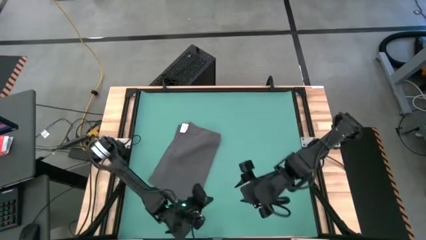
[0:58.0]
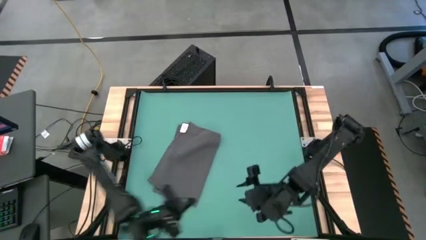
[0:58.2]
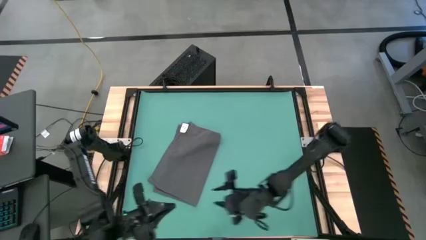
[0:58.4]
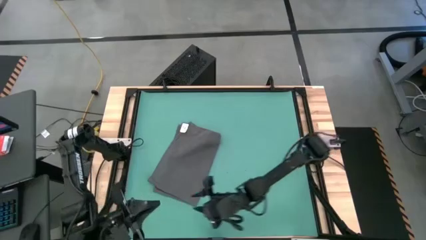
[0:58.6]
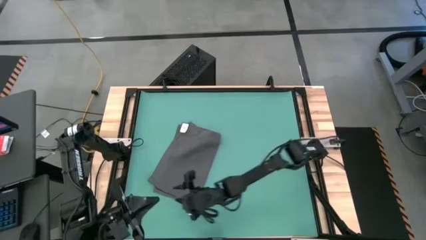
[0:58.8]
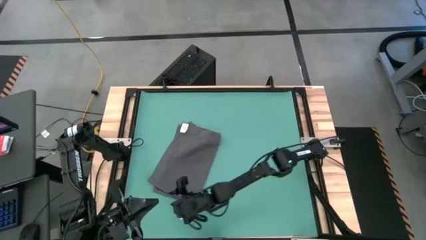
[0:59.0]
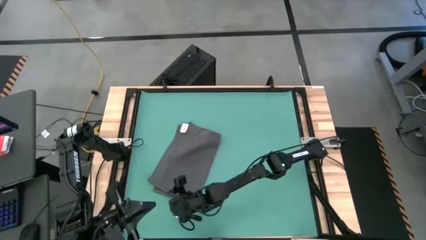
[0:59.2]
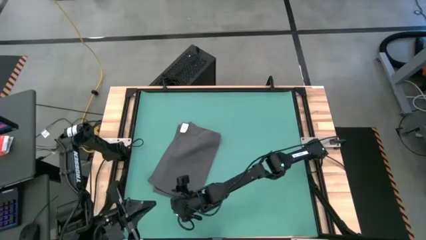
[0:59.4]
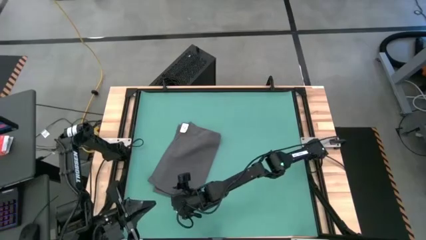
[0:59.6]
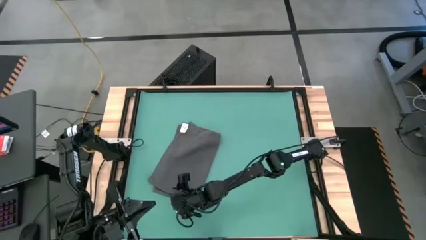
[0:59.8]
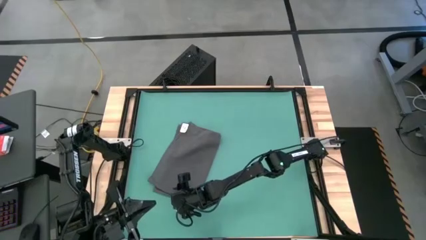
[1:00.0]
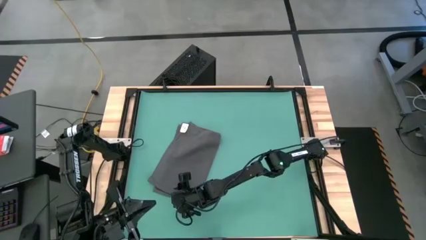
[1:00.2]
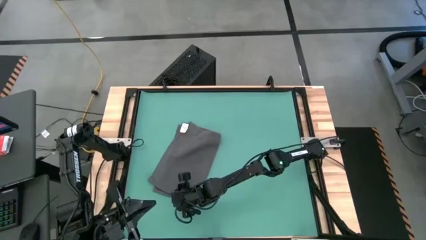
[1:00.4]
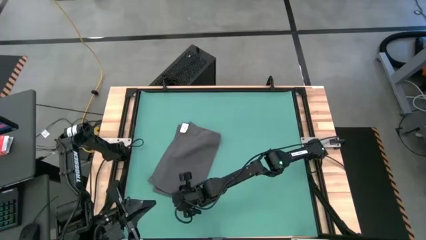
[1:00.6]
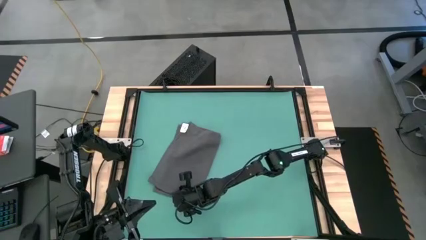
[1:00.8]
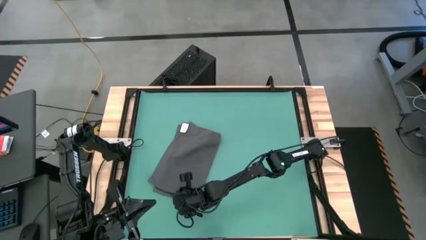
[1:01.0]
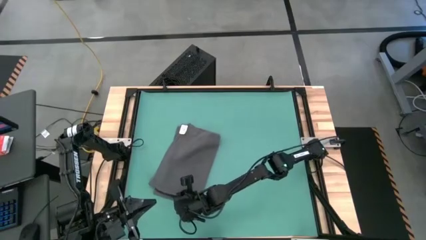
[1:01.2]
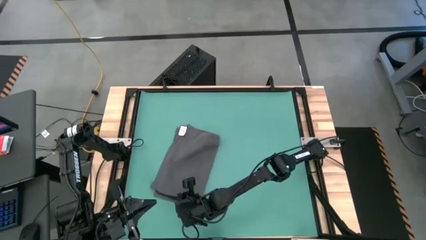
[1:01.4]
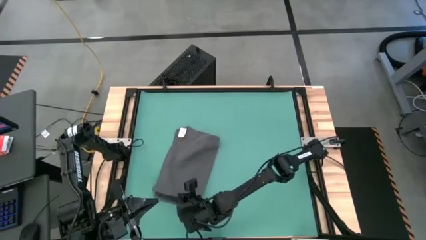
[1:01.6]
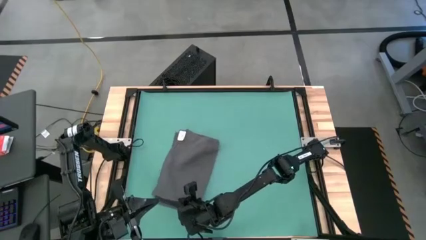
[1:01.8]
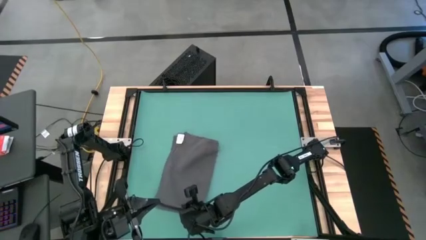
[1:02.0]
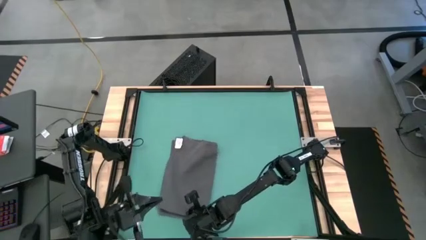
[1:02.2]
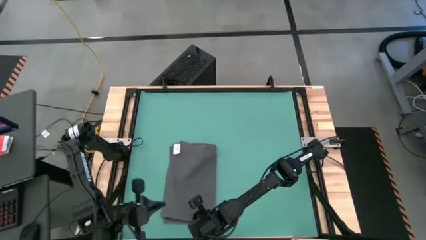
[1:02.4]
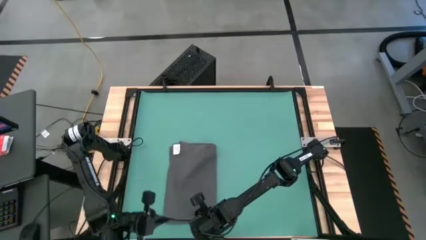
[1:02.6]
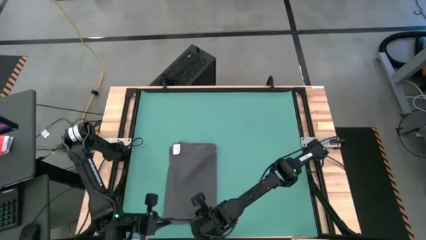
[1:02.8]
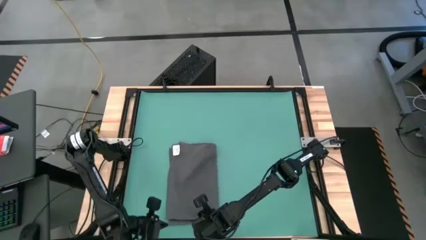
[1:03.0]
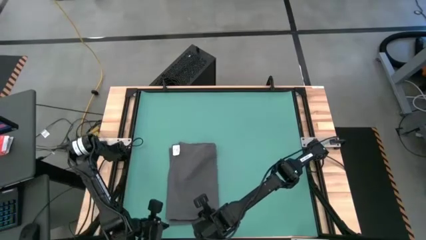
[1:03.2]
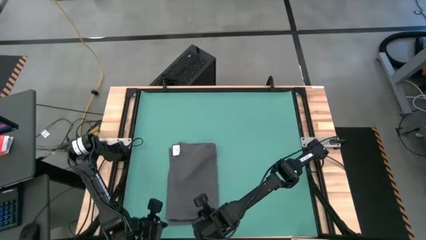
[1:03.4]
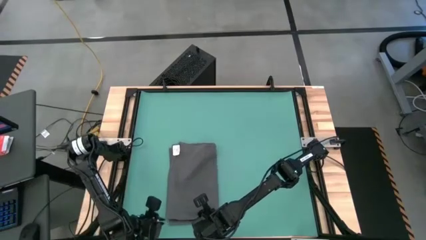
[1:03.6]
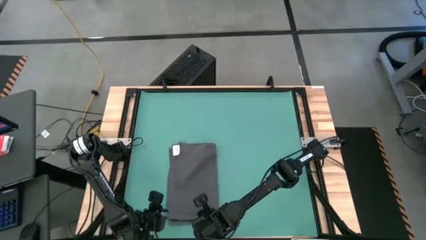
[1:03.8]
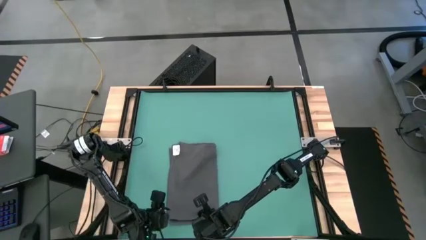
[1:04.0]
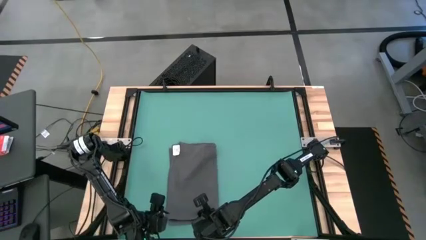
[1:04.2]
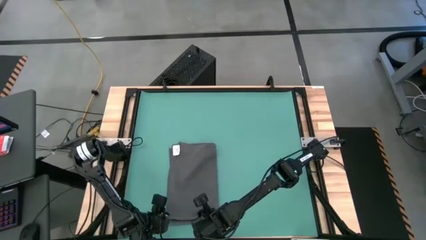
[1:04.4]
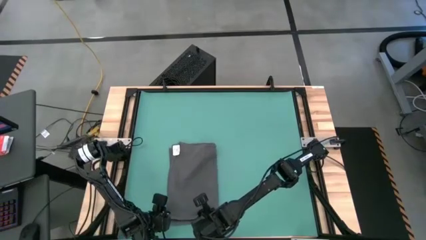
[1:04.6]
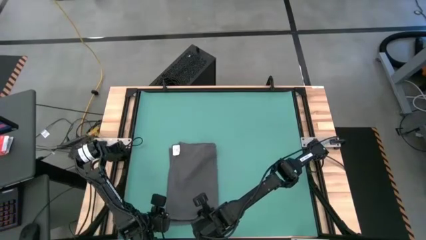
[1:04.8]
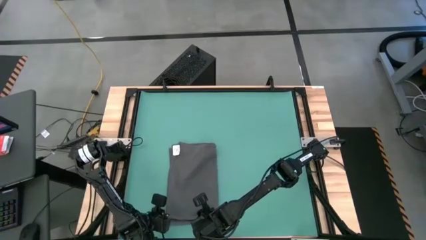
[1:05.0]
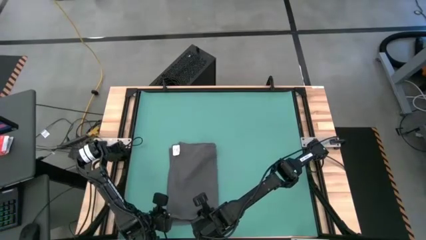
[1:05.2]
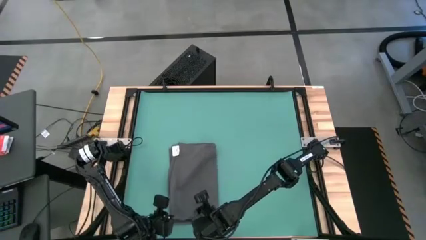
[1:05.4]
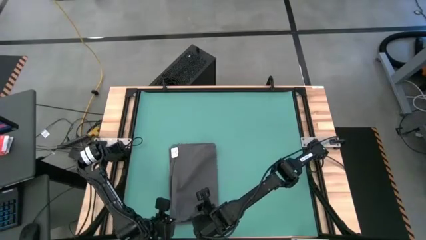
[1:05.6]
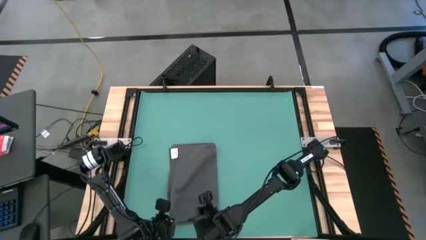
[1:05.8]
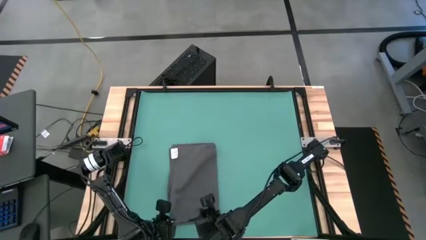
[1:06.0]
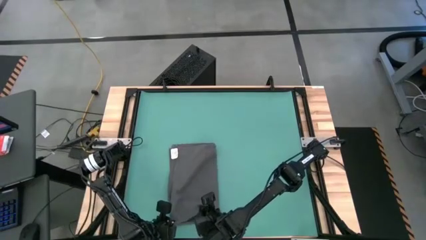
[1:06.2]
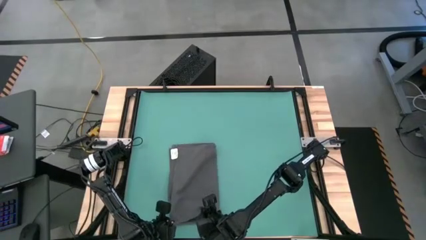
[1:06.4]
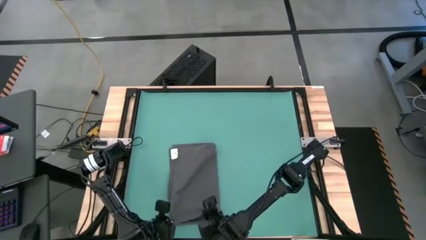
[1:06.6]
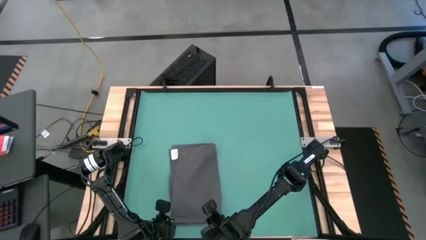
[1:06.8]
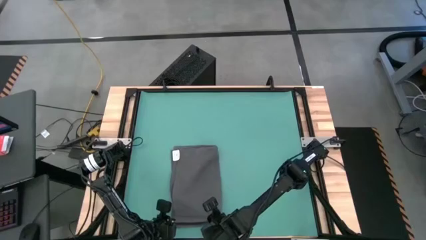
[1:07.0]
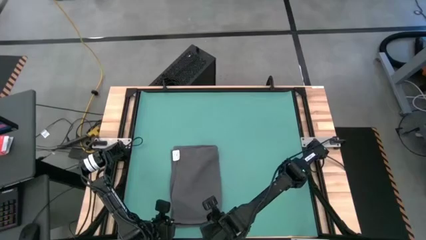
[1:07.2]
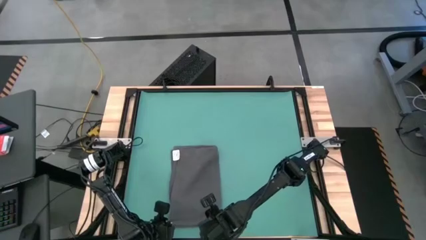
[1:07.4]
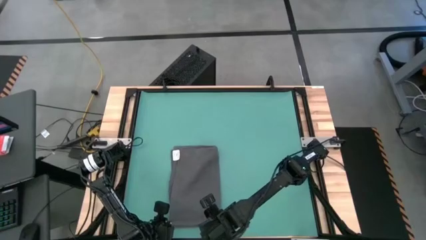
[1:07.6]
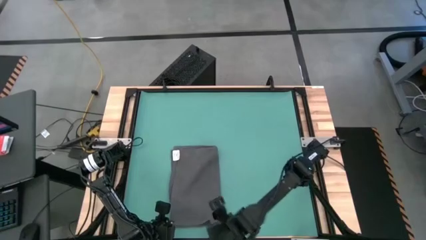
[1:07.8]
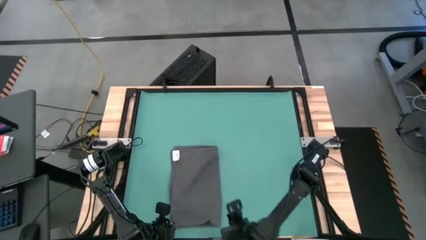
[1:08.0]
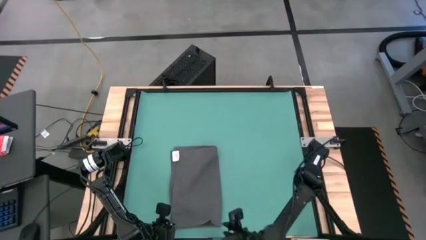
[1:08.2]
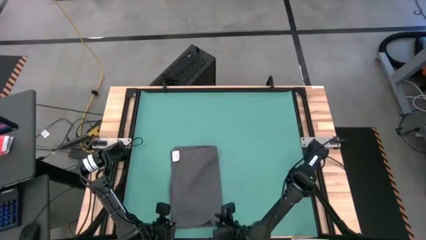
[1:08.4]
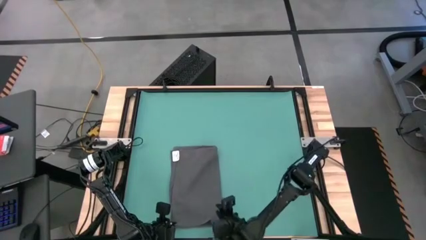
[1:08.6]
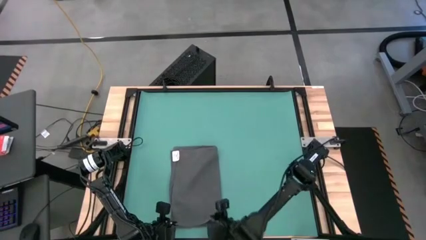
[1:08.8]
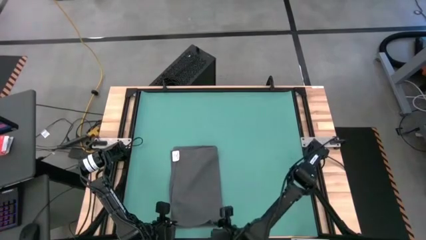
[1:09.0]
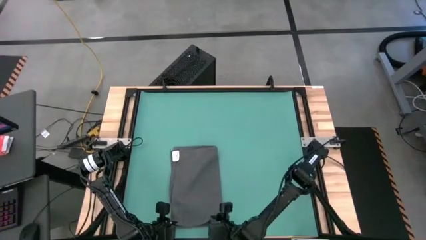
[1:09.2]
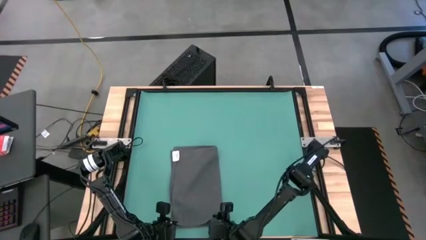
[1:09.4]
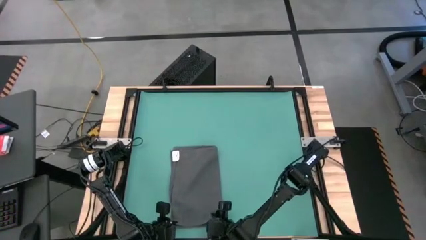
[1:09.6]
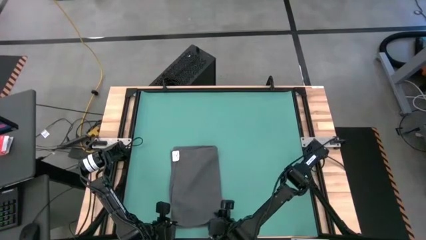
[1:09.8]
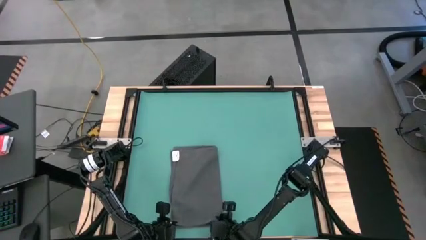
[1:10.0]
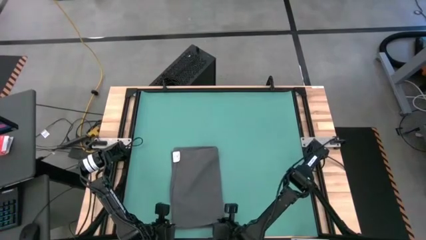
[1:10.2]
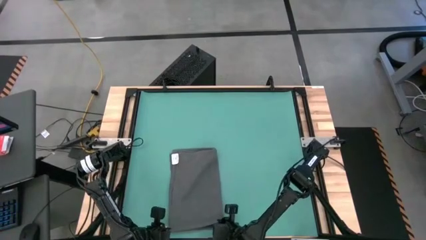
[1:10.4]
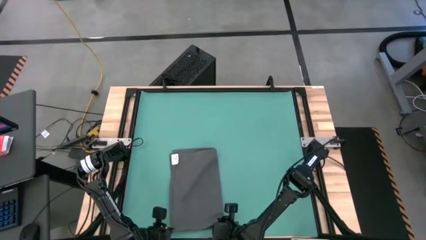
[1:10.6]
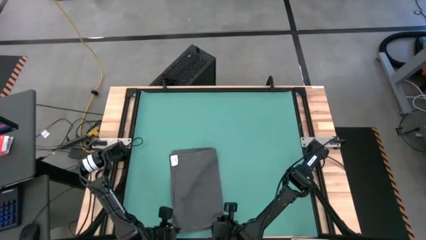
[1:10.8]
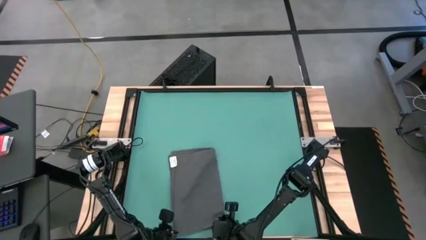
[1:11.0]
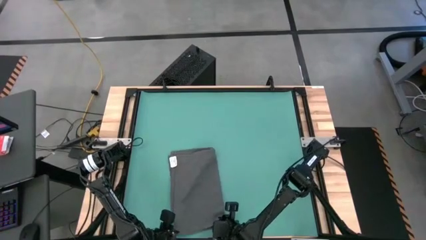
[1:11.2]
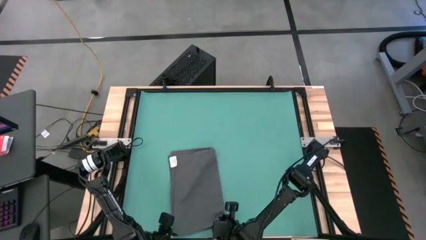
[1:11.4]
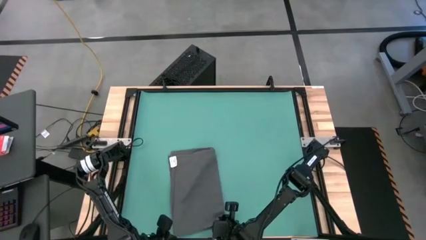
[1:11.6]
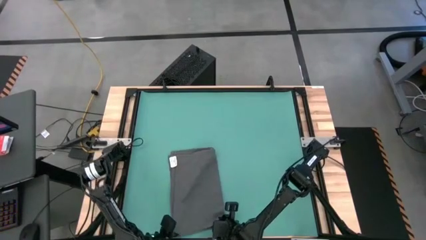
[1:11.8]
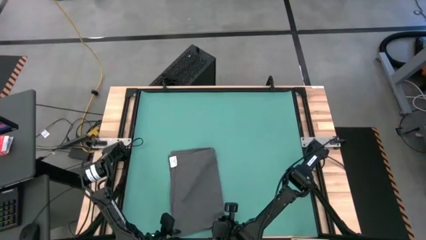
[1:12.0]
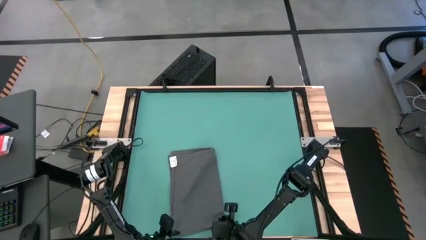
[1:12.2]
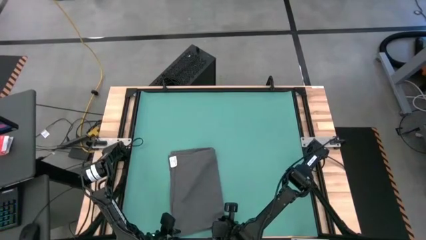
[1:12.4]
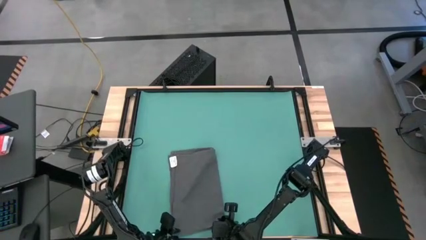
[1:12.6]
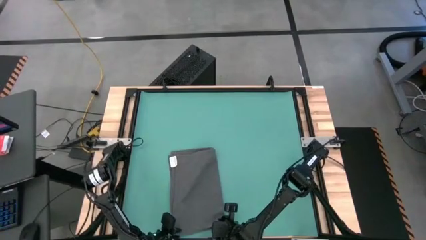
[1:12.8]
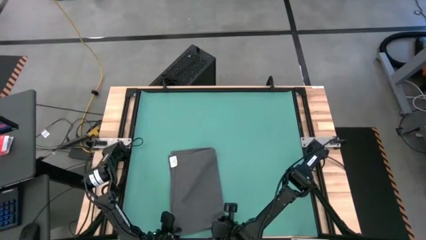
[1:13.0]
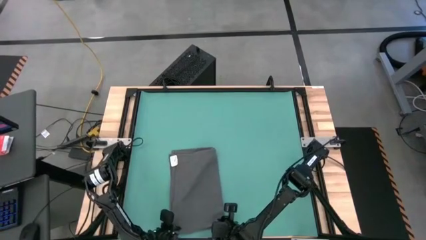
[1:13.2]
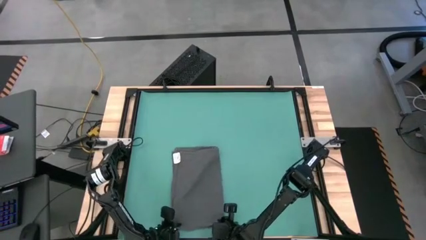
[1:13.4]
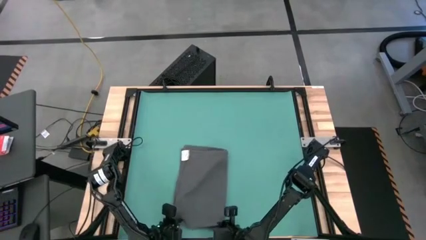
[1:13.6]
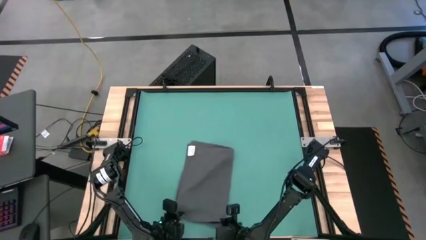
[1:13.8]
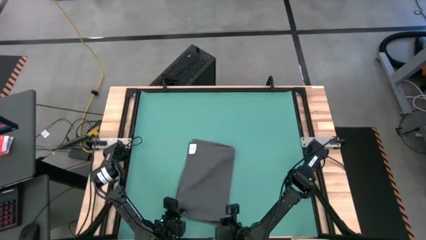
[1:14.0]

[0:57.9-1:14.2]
Task: Roll towel
Roll the gray towel

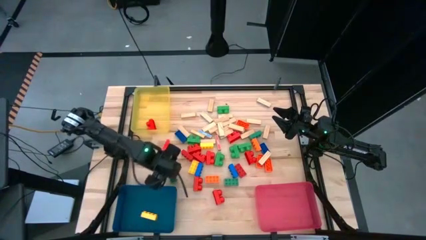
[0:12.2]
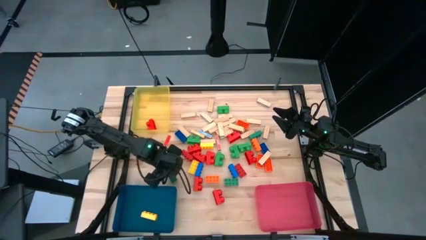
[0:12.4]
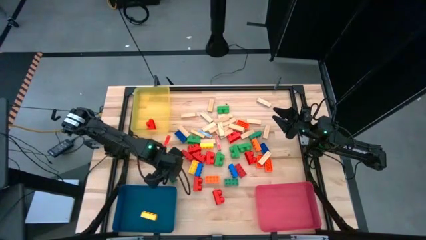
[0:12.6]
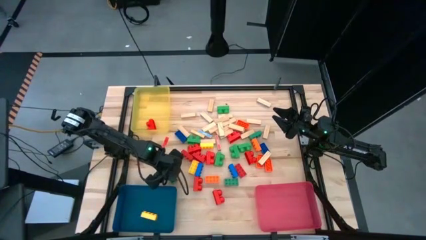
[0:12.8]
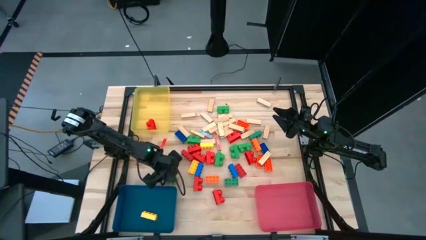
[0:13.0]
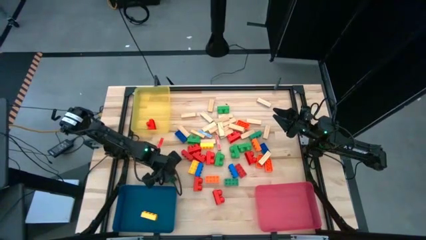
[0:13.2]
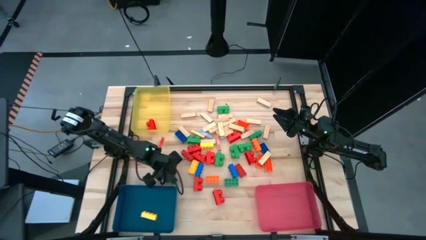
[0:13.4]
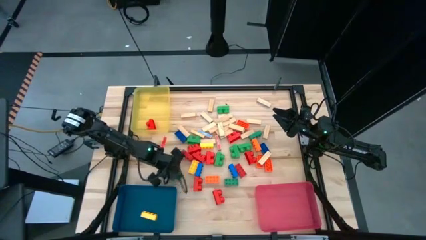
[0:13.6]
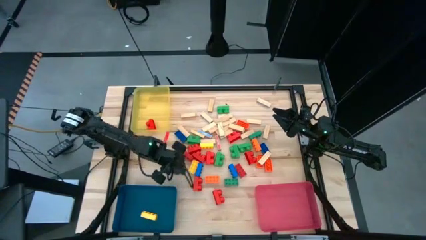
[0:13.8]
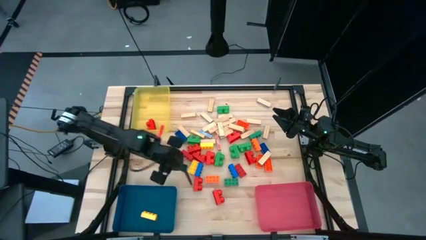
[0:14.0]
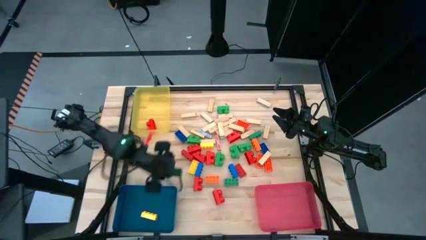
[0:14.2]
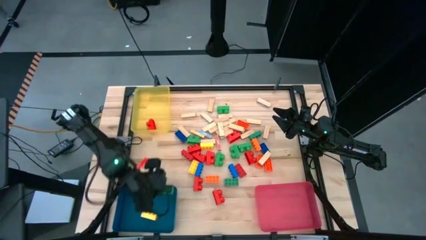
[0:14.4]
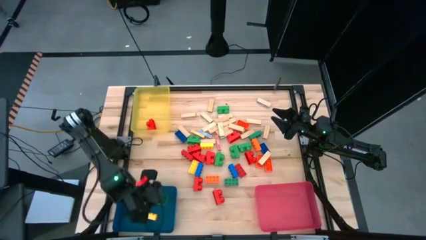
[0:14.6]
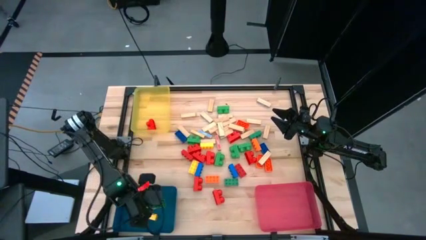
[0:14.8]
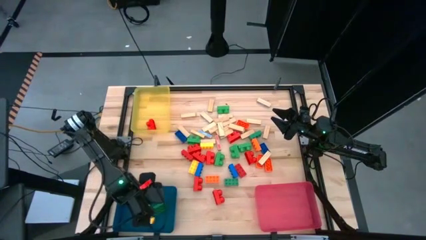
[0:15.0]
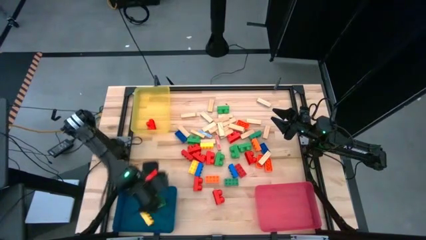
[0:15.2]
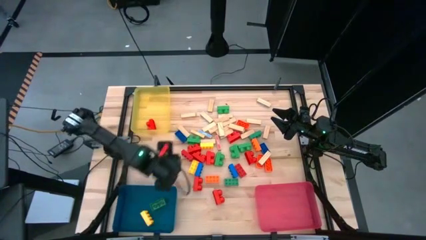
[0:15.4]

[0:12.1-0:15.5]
Task: Sort blocks by size
Put the green game piece into the blue bin
